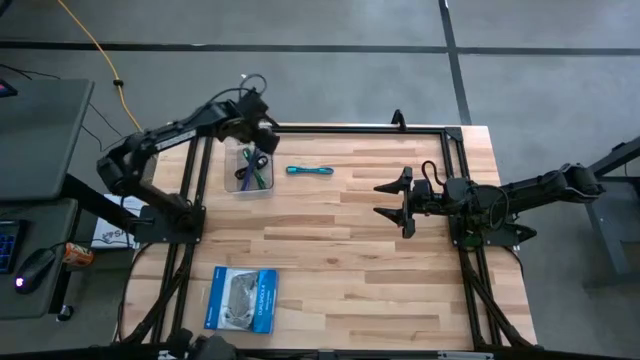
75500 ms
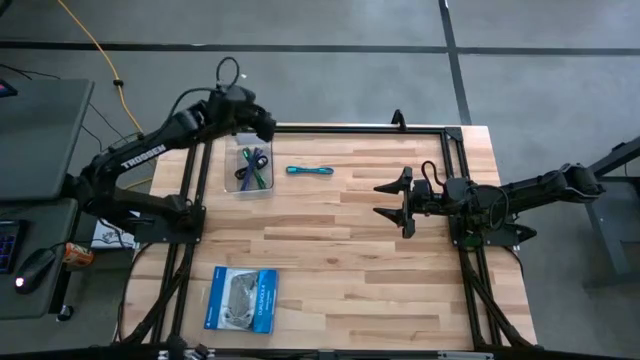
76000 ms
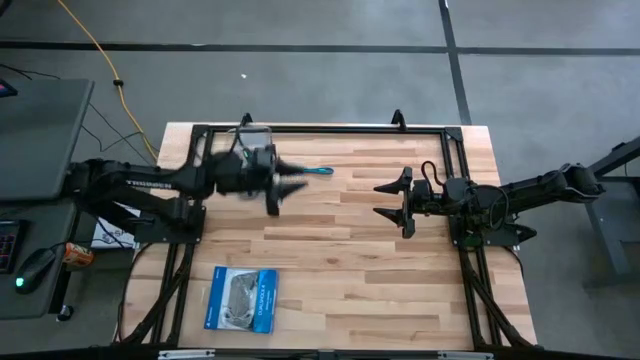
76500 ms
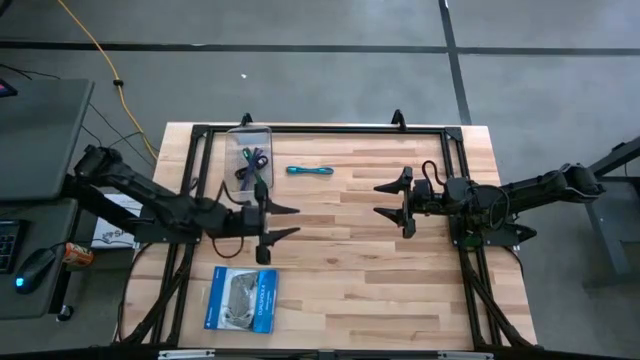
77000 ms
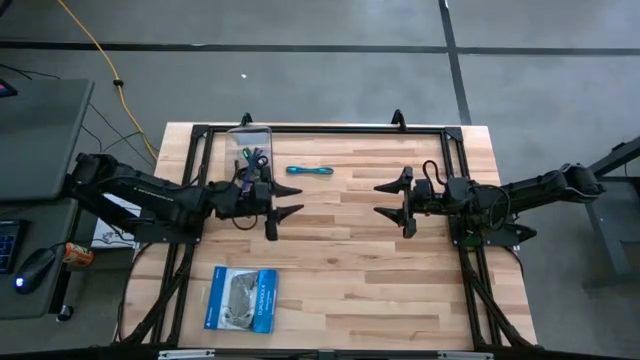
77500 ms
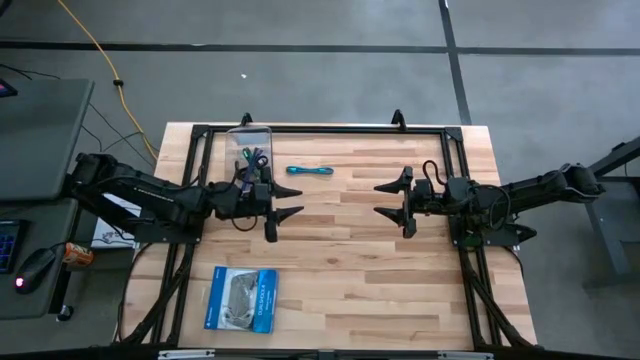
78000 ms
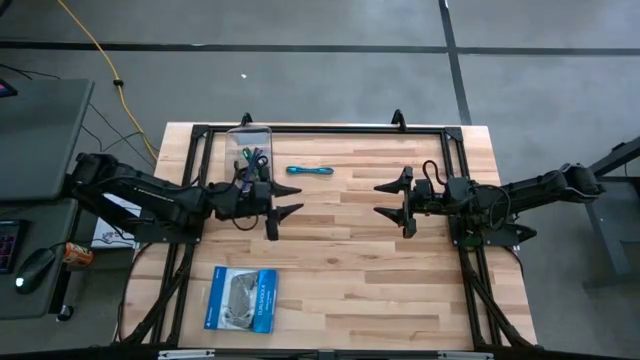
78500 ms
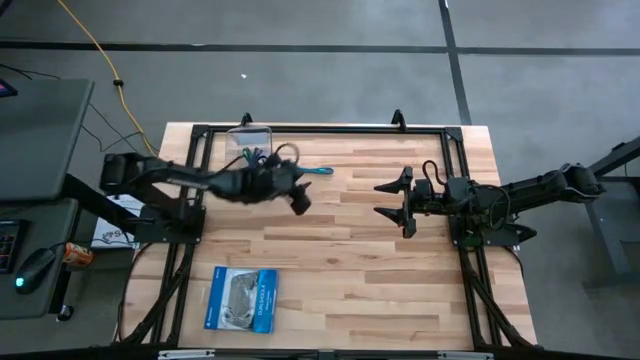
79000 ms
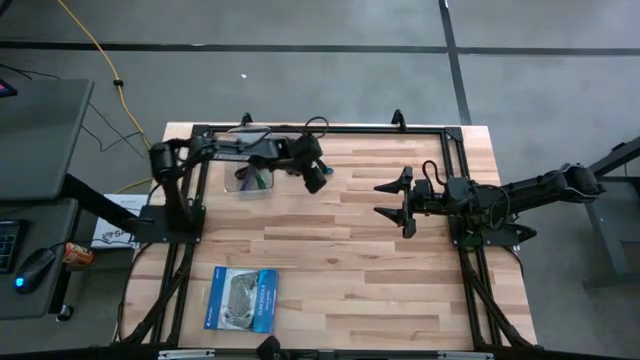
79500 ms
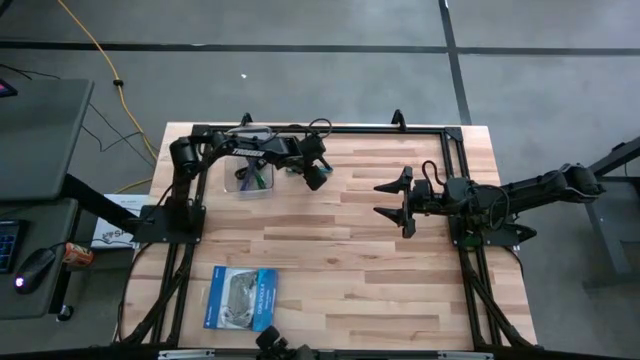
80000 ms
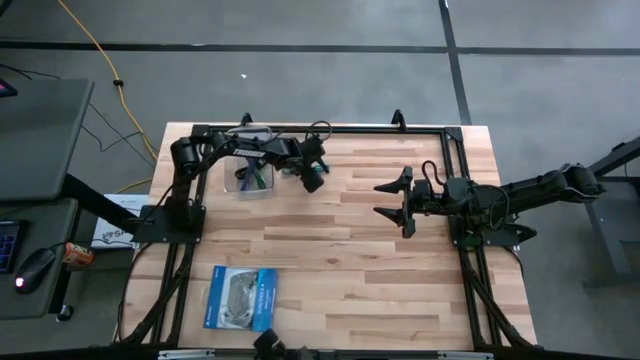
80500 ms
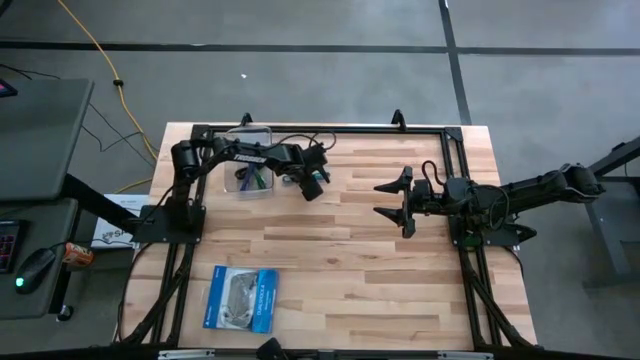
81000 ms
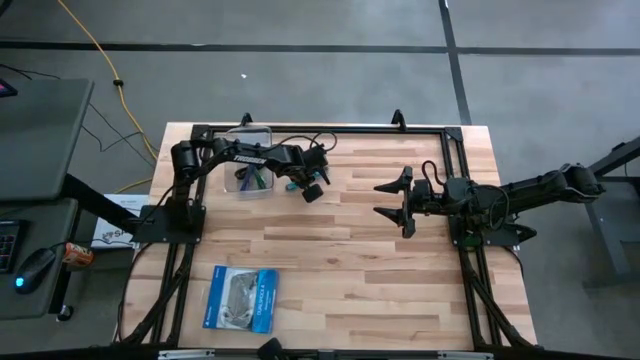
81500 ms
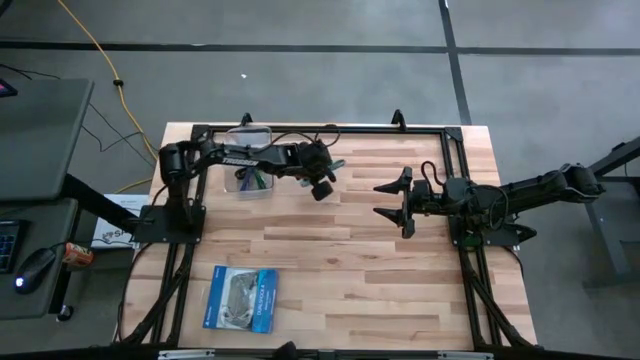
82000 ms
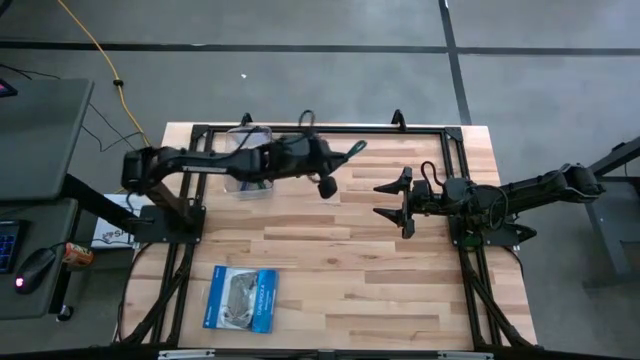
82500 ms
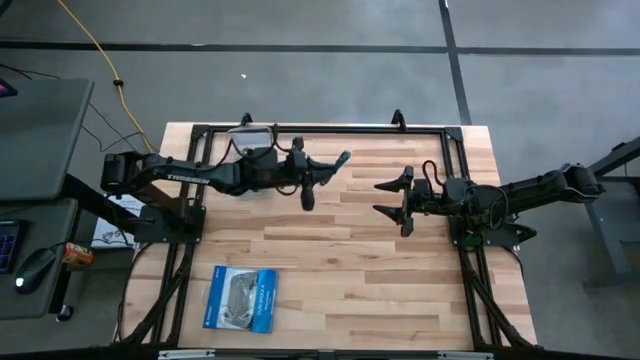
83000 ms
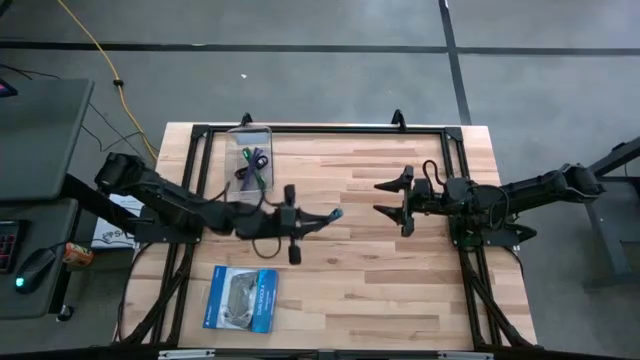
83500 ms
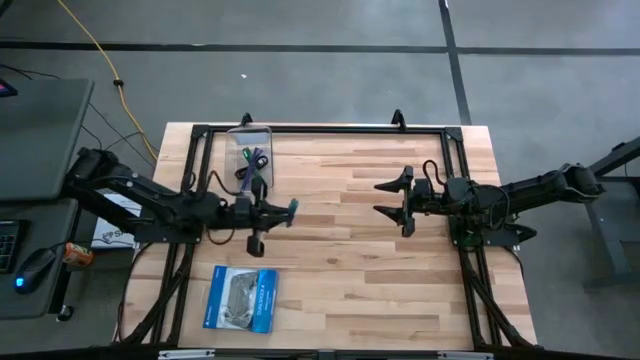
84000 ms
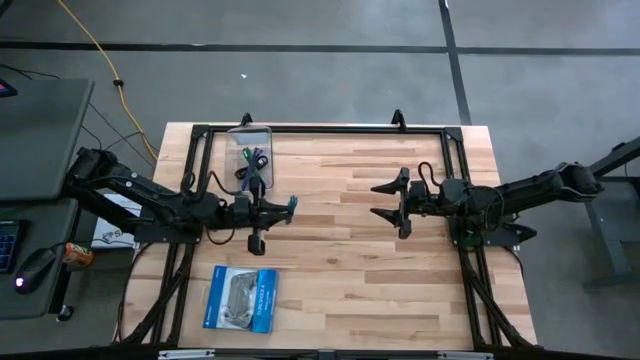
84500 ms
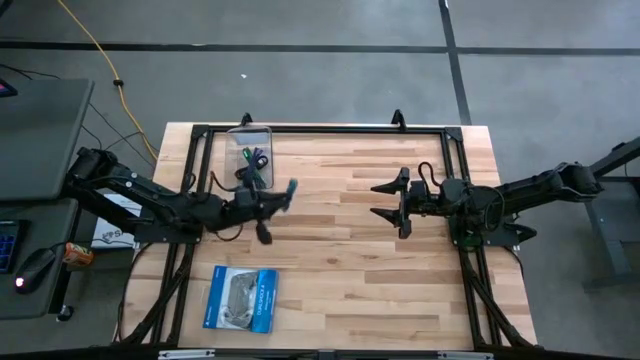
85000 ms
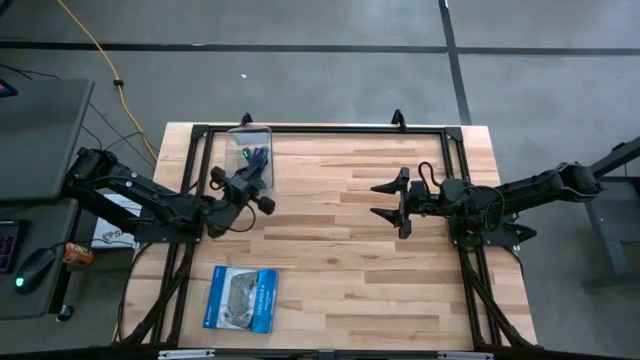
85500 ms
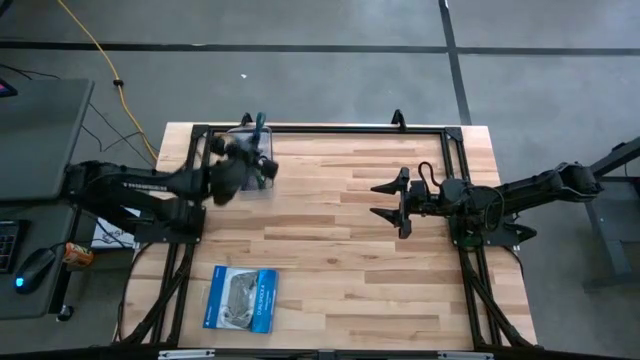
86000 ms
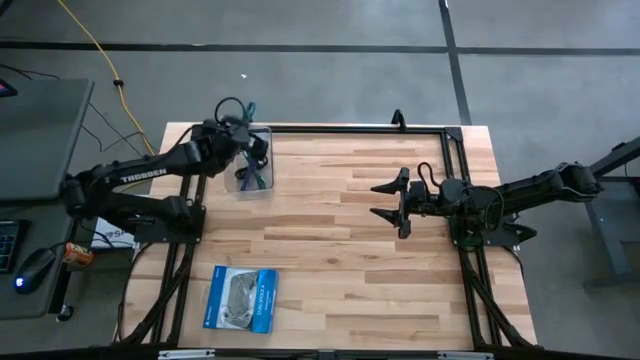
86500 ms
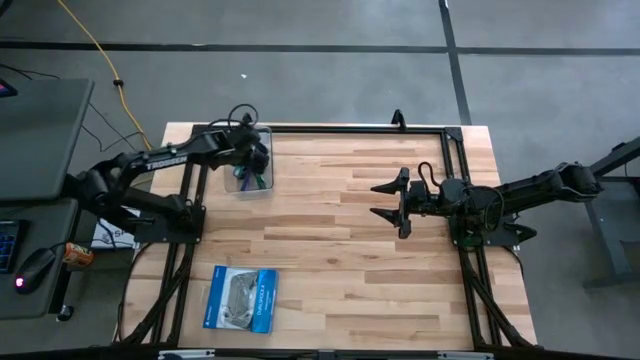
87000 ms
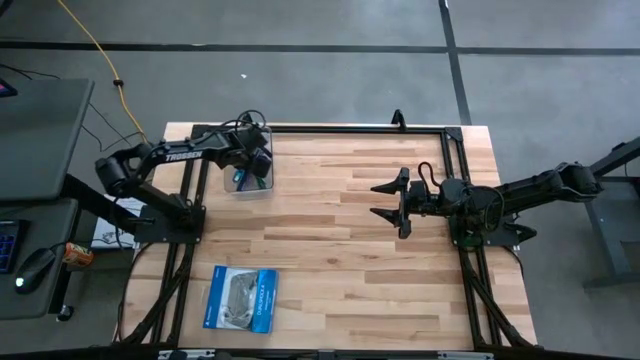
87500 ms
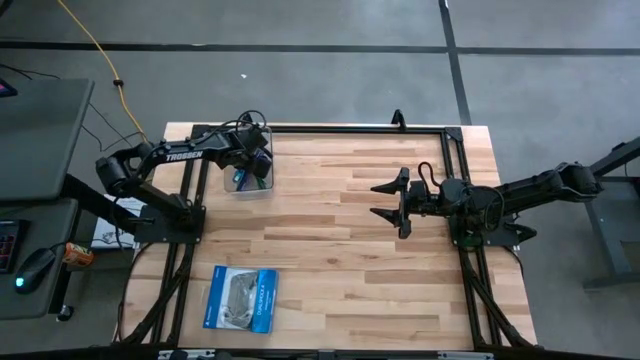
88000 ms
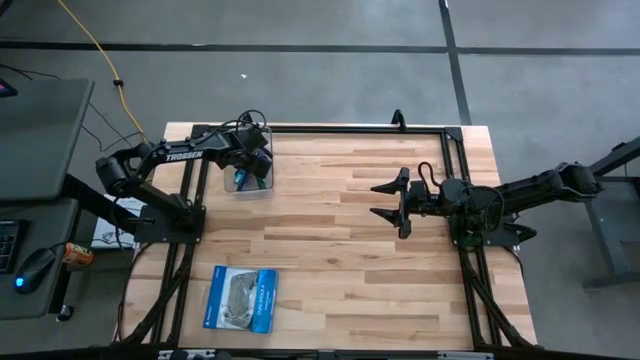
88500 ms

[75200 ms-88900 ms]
Task: Pick and place USB-C Cables
Put the blue USB cable into the transparent bin

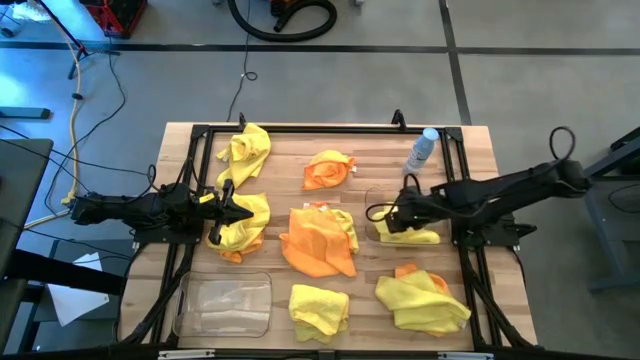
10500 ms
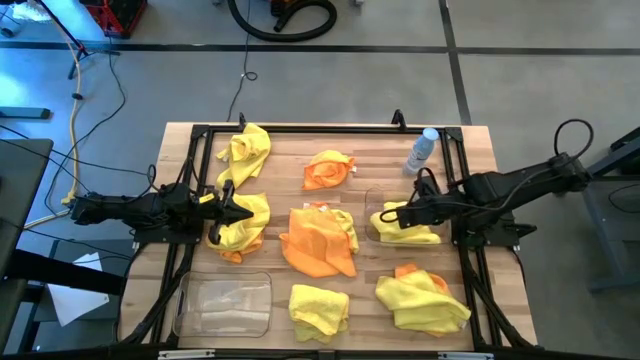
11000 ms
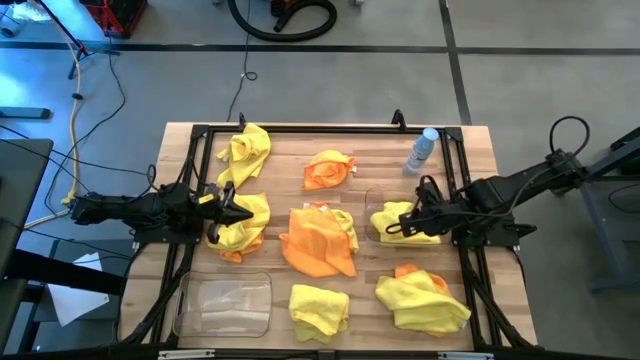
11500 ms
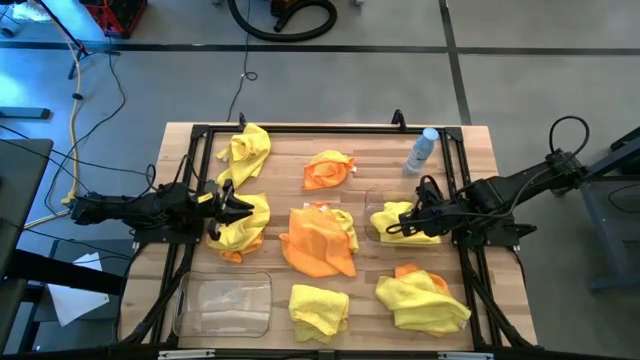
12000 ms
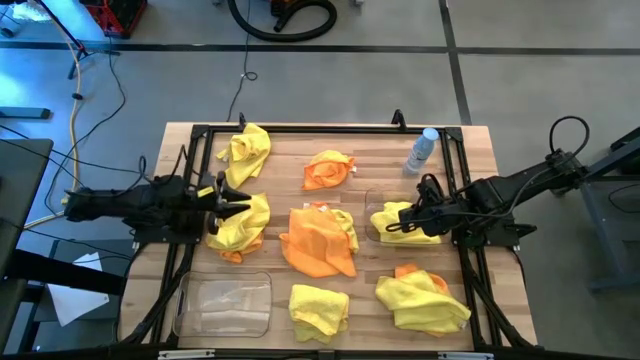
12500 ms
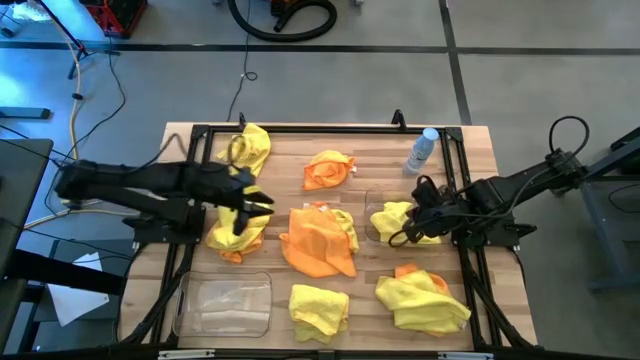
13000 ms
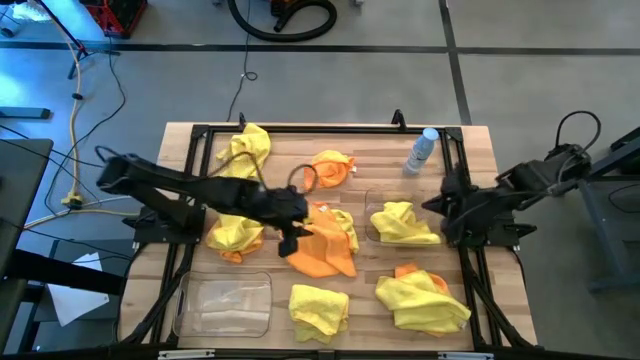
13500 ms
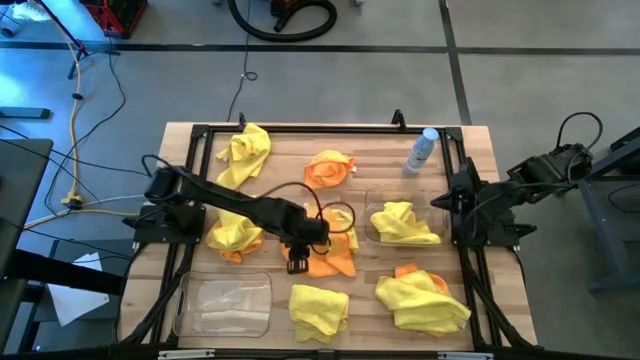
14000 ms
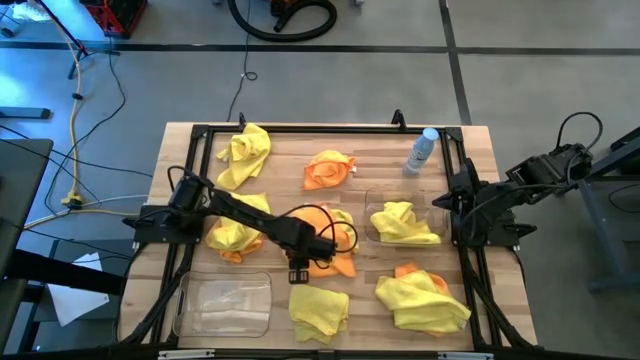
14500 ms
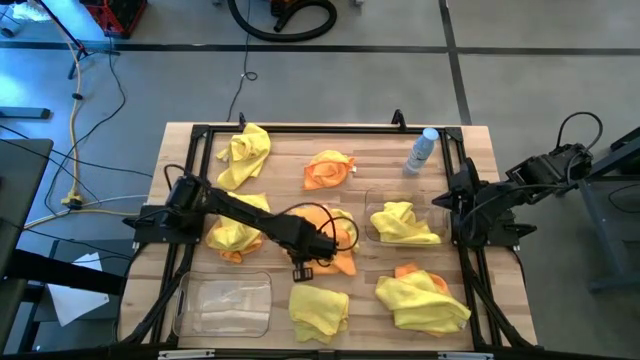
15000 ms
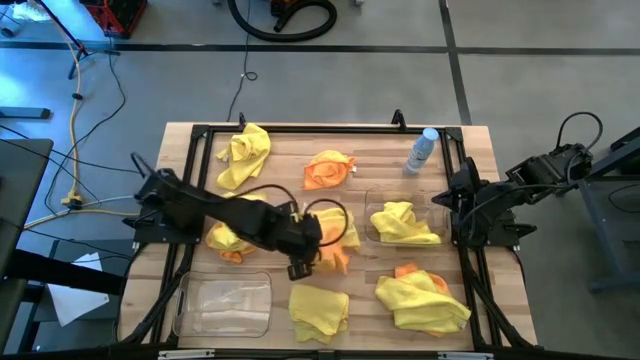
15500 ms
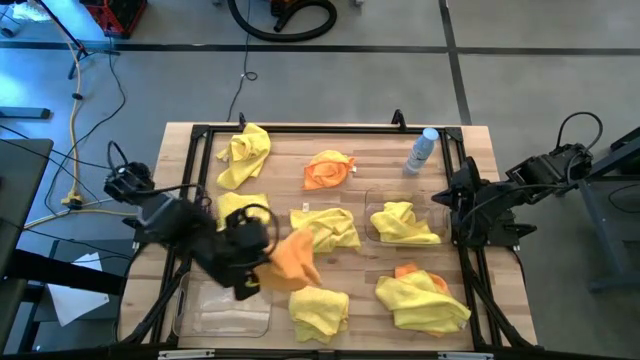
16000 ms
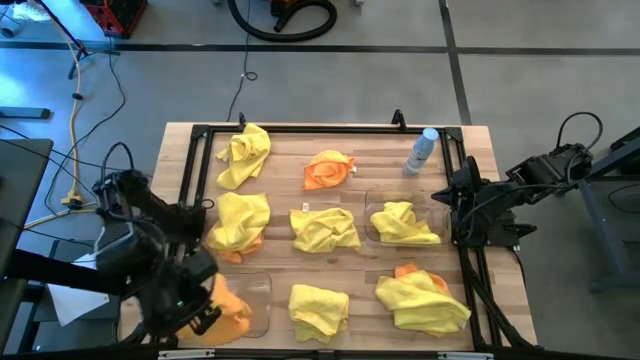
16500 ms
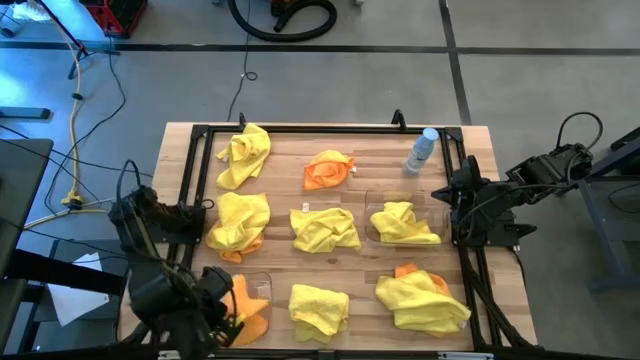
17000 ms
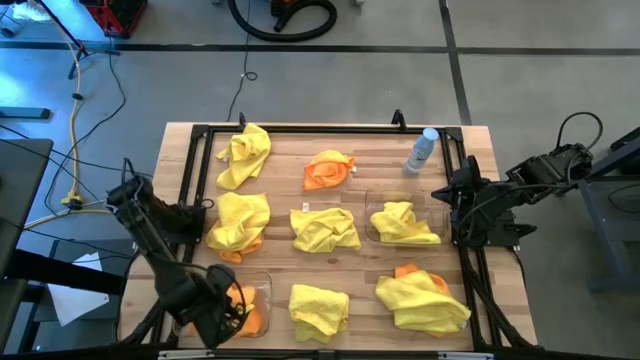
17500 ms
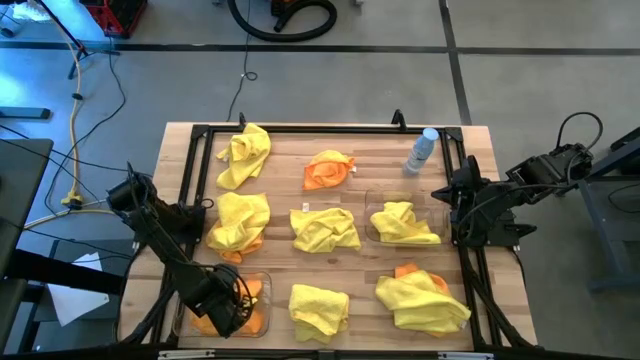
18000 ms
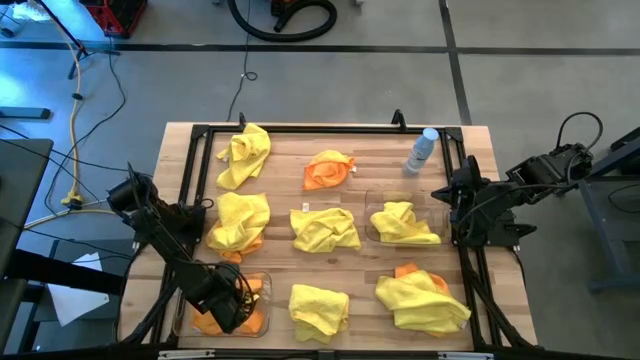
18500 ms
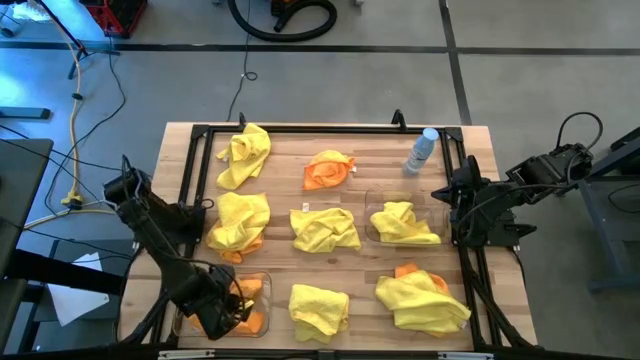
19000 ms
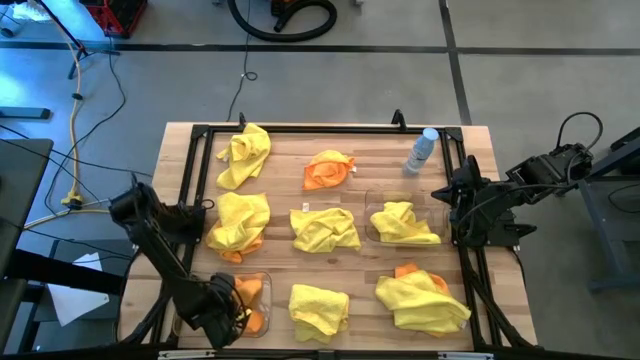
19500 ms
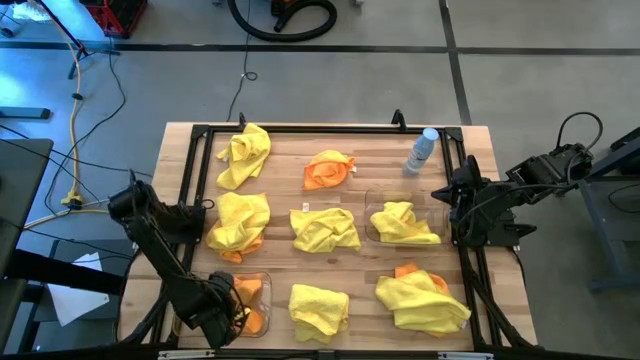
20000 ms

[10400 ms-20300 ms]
Task: Sort microfiber towel by color & place in baskets
Put the orange microfiber cloth into the left transparent bin
